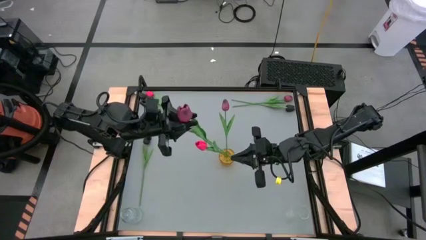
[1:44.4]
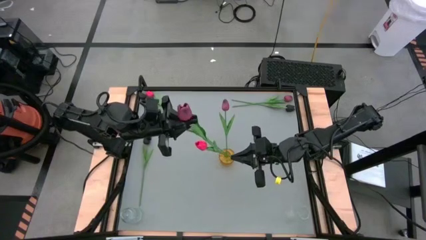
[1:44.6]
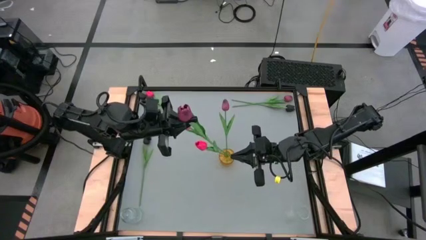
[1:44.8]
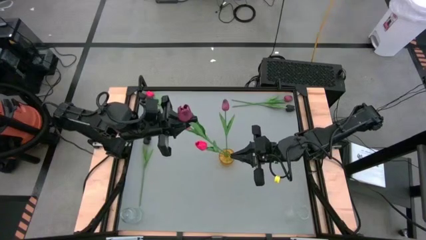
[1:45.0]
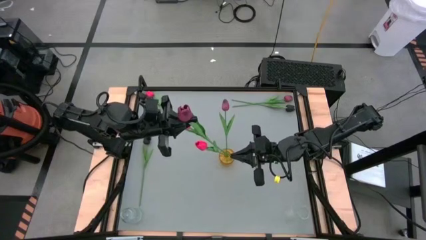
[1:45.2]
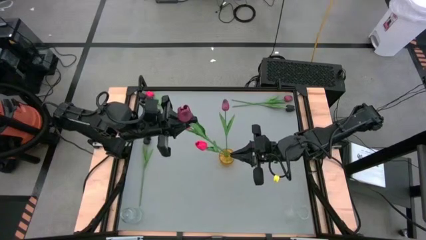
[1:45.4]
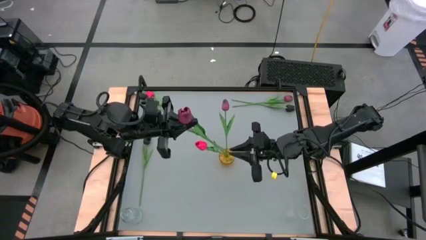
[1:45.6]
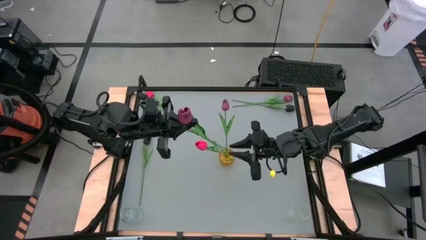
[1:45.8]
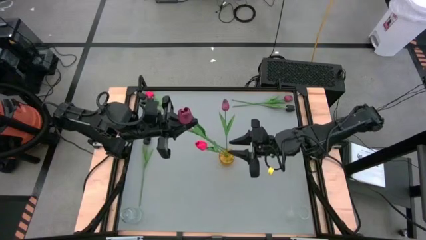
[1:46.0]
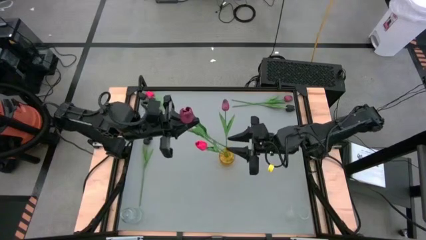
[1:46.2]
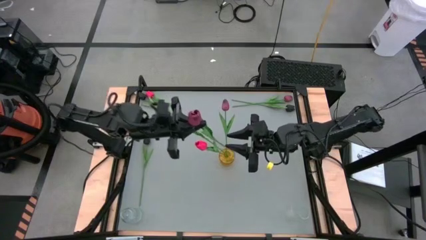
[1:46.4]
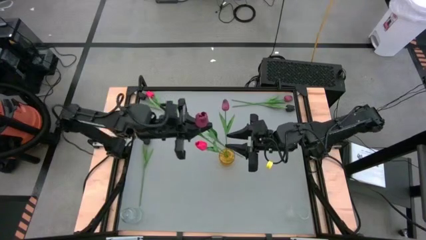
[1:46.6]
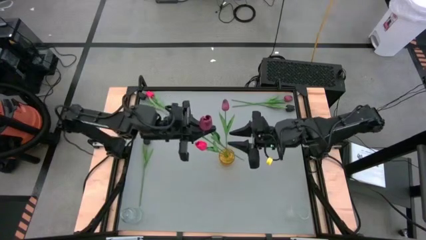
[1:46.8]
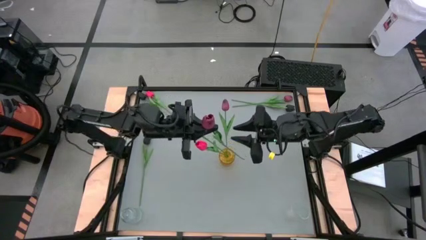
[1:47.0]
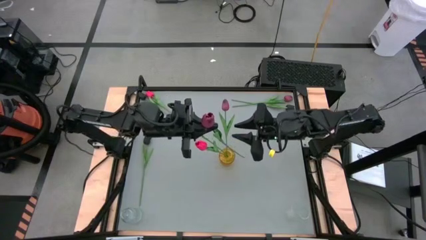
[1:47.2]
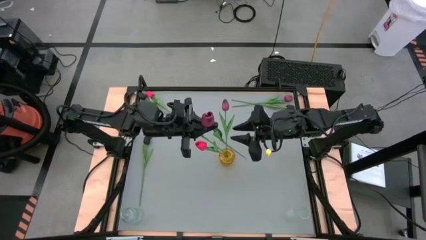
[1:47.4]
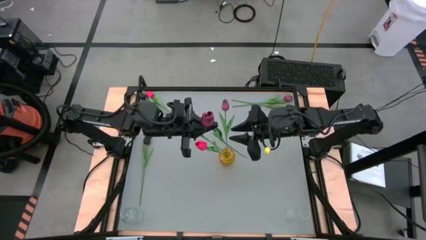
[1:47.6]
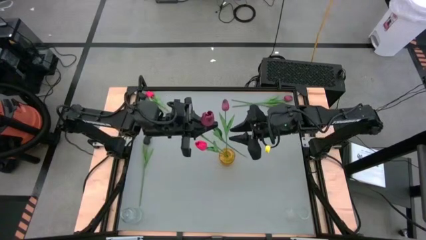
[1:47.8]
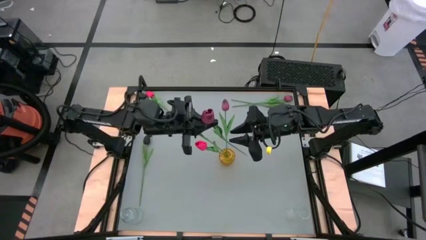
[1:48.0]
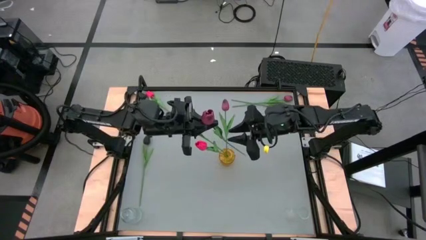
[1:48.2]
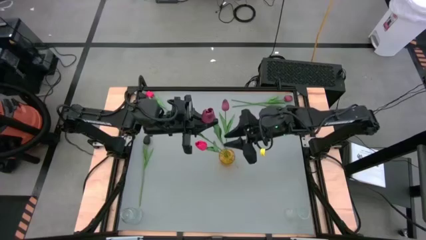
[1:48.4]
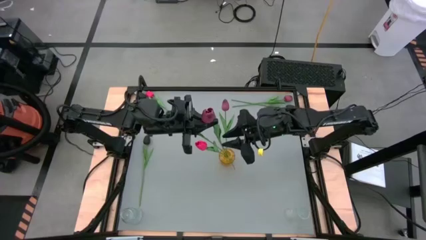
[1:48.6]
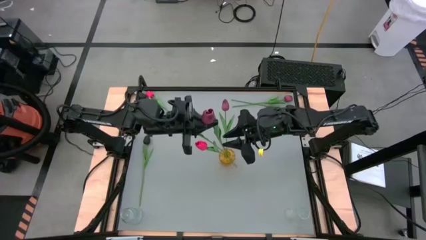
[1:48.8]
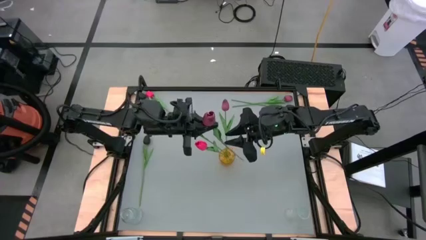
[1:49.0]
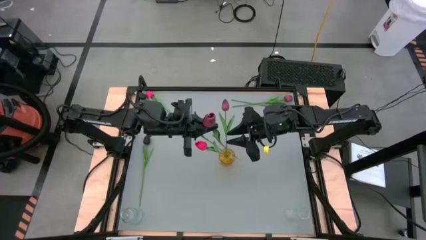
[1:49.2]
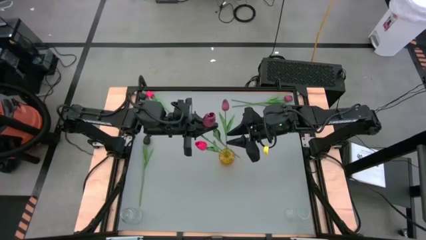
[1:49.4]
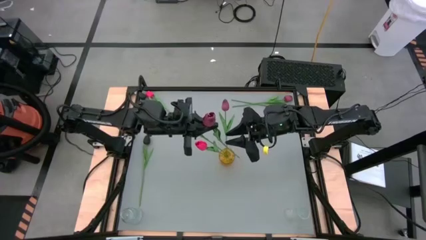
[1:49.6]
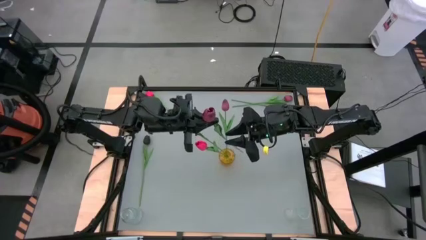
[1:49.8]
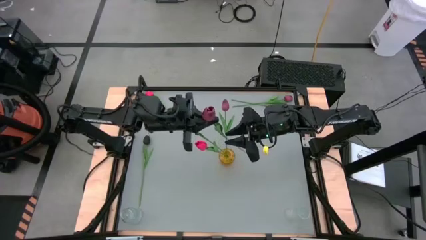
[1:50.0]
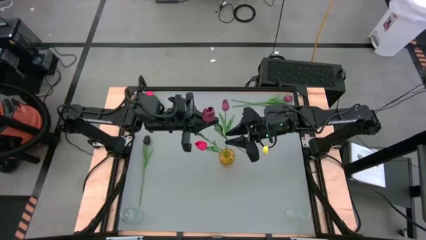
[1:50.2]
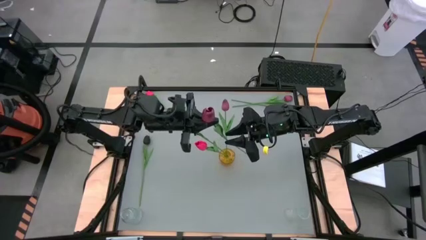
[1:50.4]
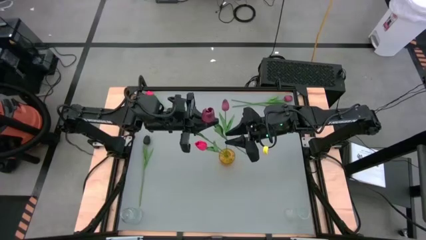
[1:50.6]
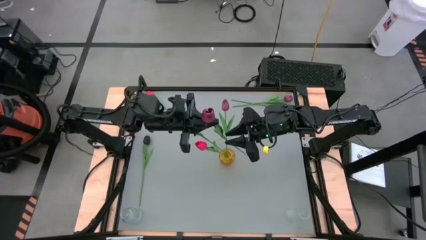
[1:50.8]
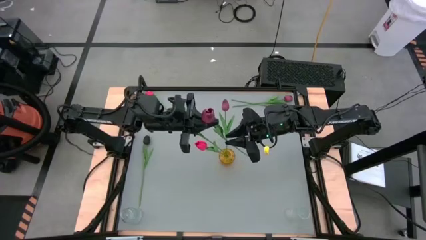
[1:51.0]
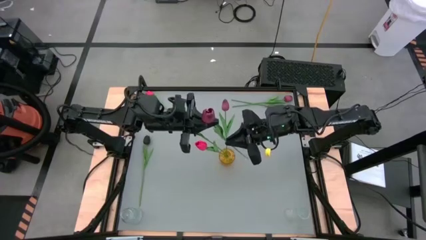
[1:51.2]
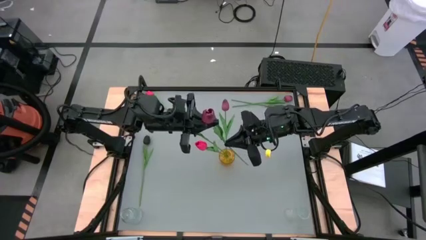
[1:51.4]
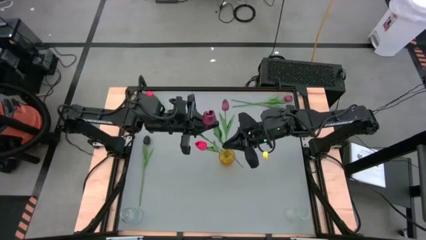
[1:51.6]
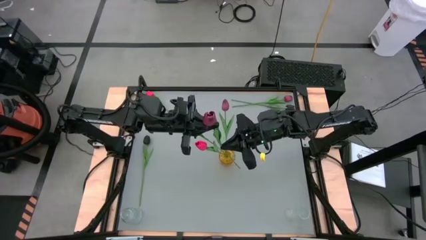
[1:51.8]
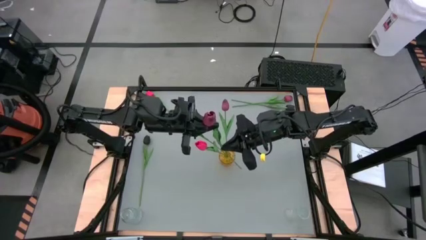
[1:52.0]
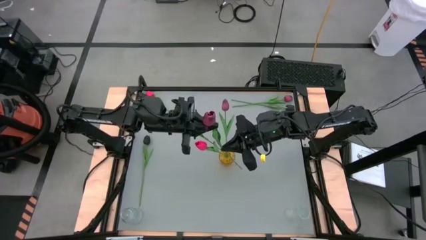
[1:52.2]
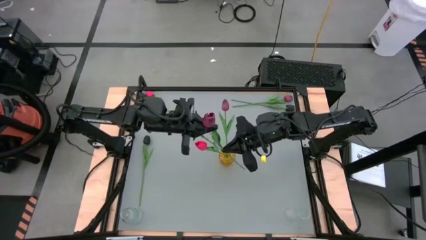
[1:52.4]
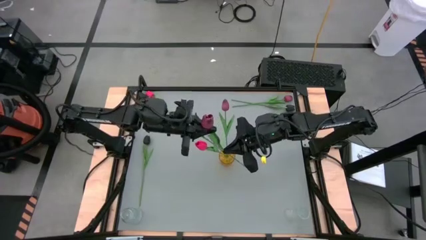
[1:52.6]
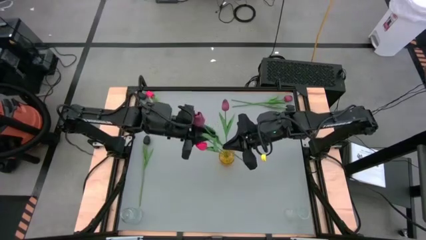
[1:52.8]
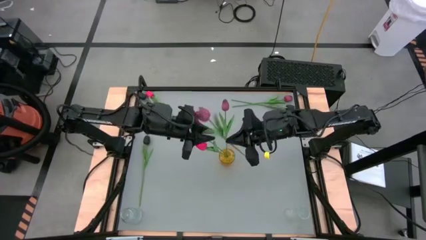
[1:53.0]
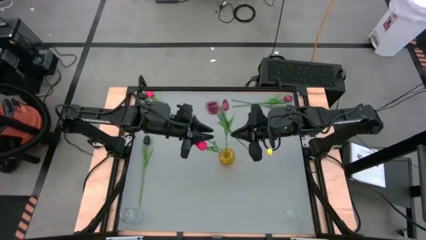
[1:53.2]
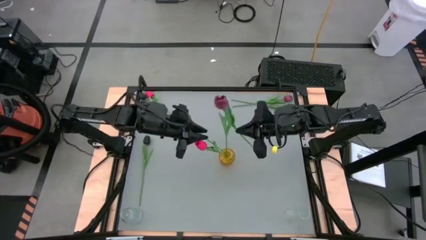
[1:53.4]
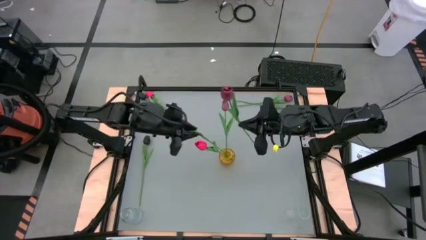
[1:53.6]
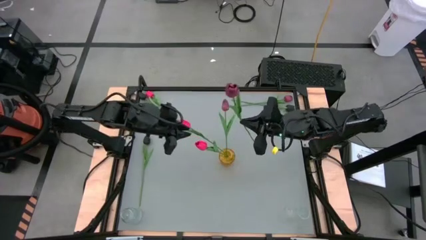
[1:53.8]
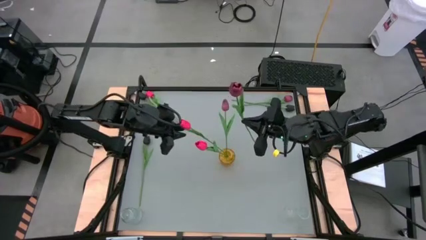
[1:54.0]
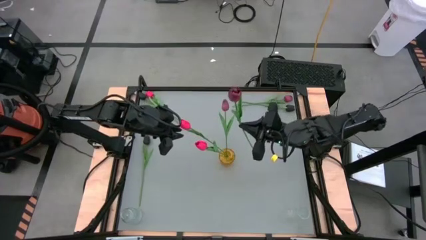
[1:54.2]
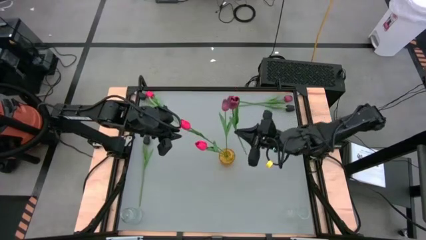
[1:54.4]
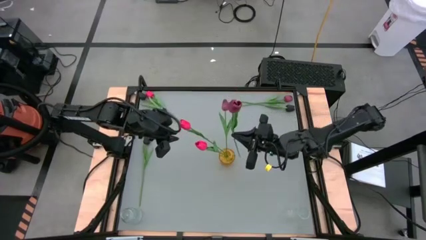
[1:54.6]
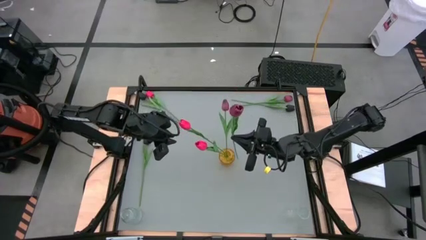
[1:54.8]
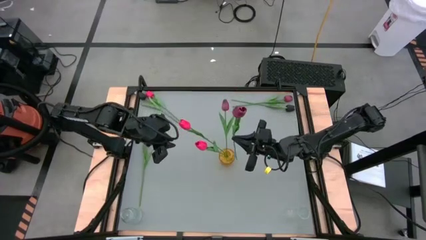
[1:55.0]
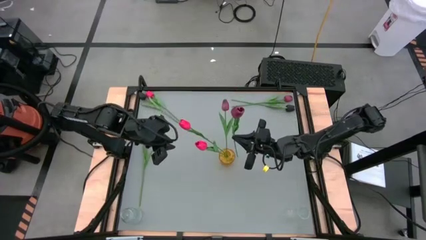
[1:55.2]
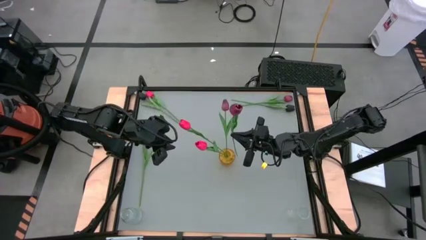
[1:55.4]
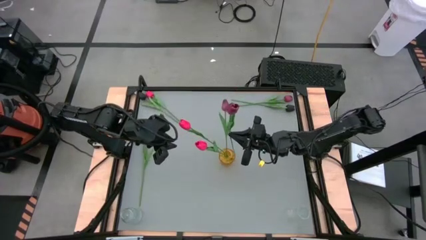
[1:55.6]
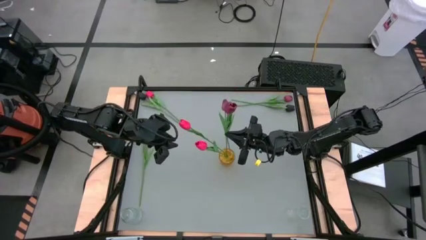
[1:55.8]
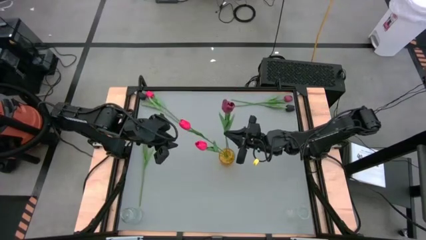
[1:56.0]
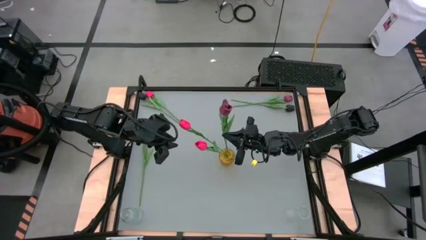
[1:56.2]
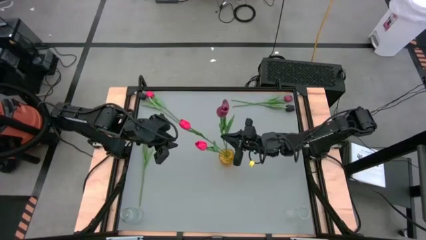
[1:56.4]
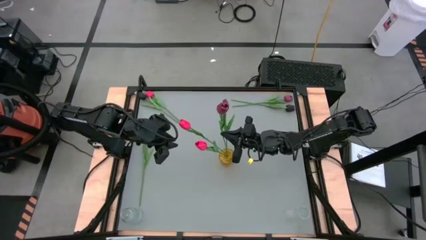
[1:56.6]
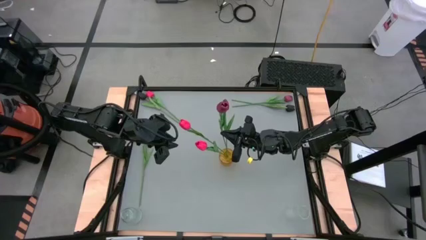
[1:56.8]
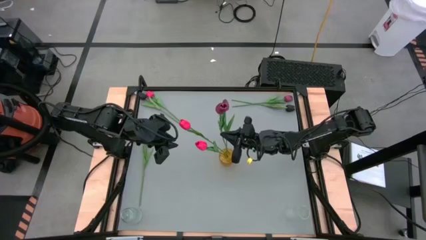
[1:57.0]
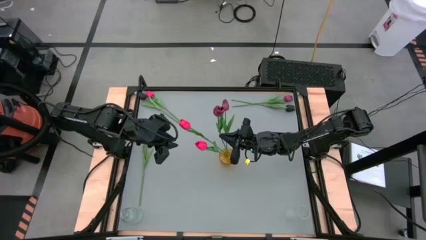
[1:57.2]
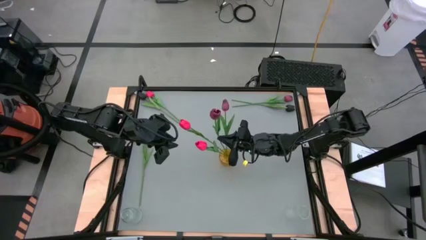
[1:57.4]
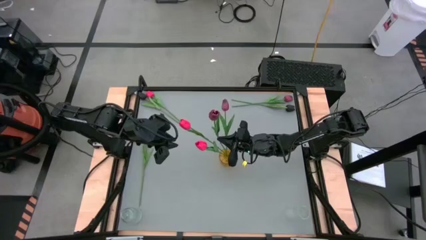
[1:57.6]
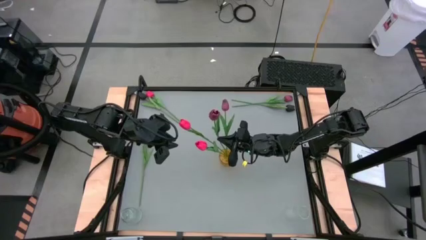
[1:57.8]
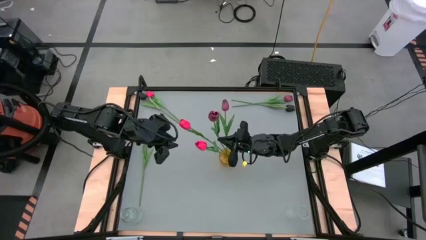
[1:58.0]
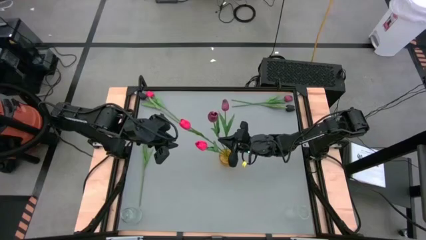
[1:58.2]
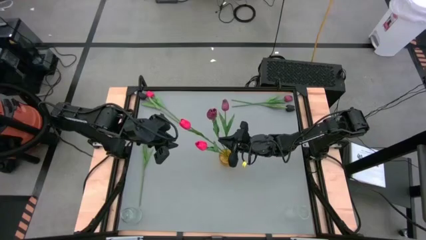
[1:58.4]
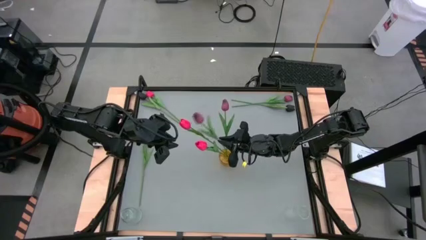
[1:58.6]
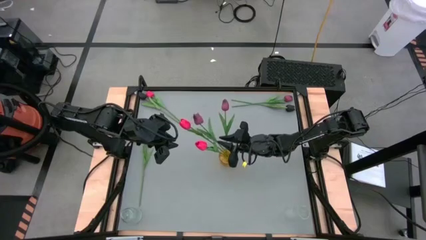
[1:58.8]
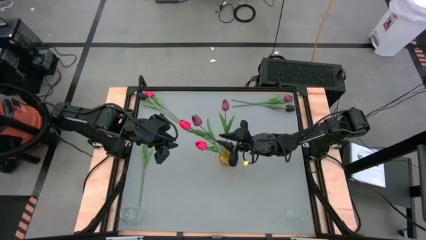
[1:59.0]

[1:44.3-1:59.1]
Task: Sort flowers into vase by color
Put the bottom red flower into the yellow vase
